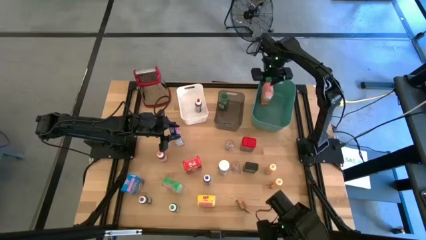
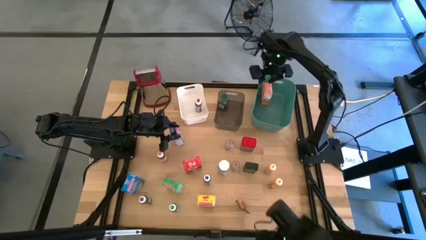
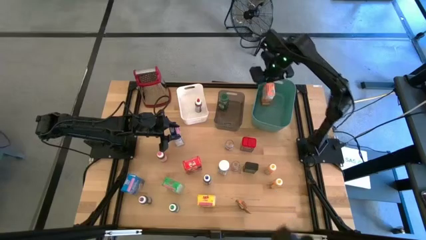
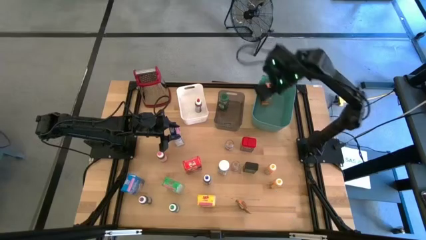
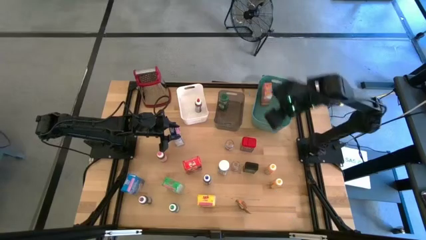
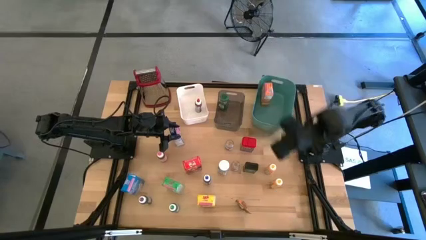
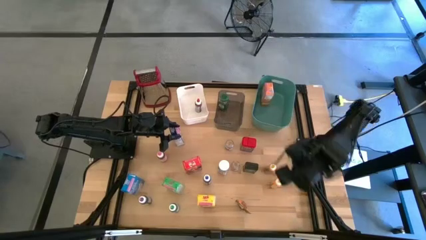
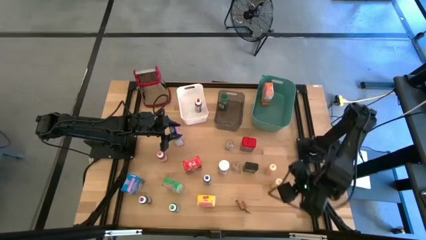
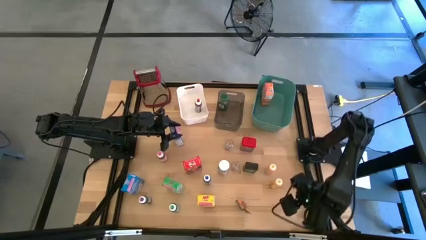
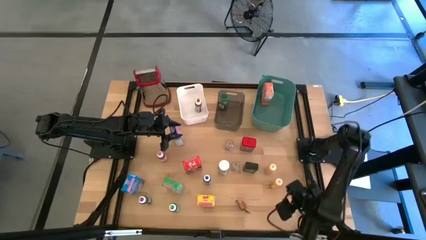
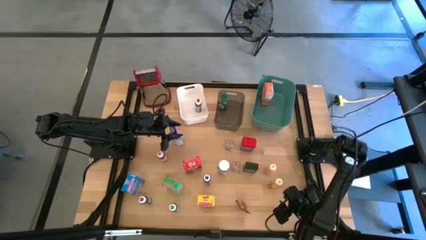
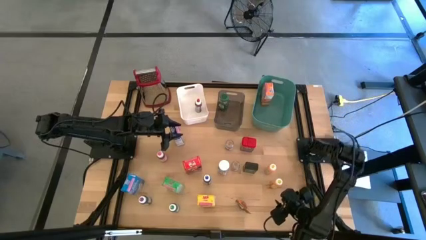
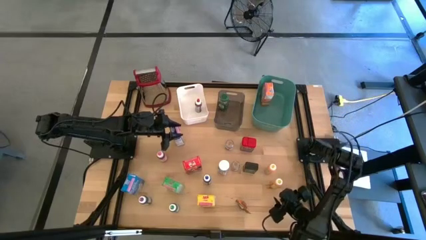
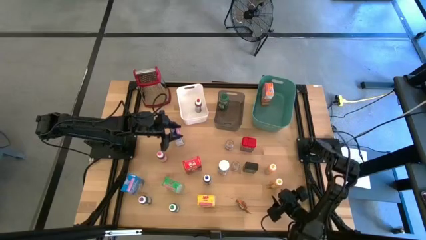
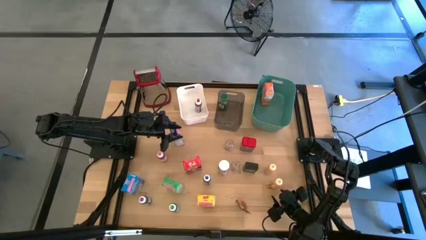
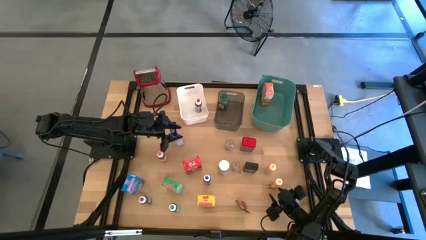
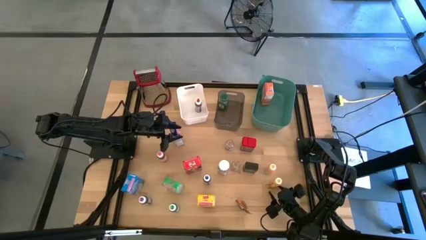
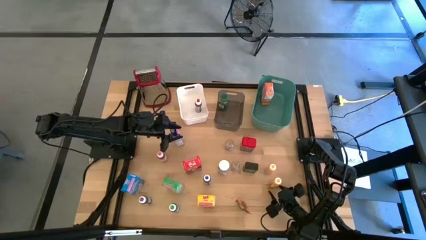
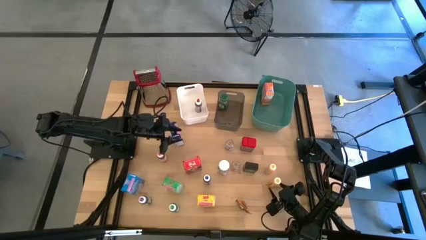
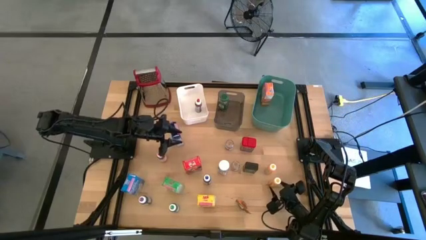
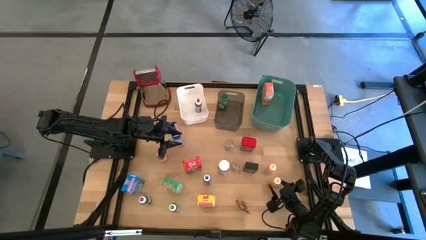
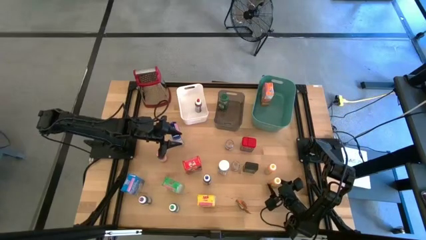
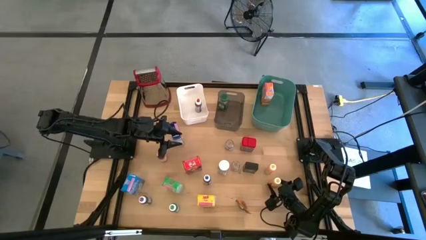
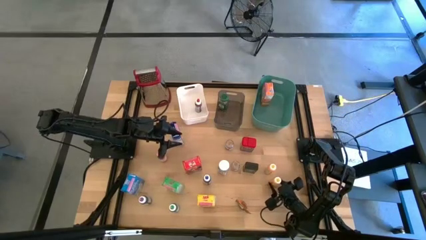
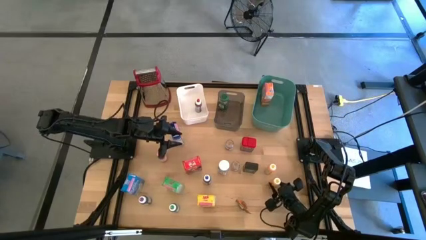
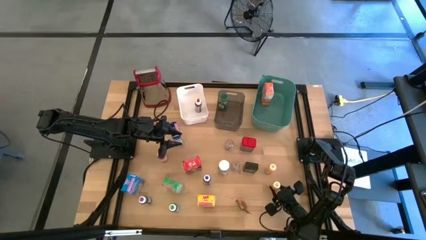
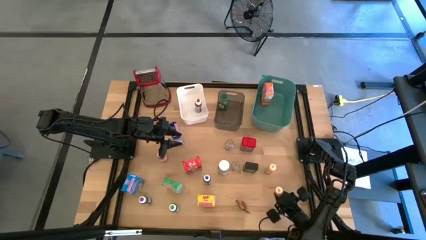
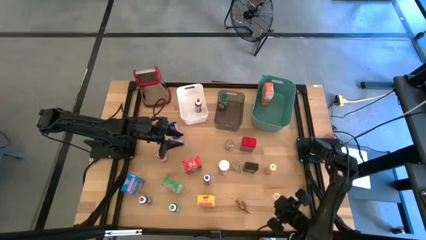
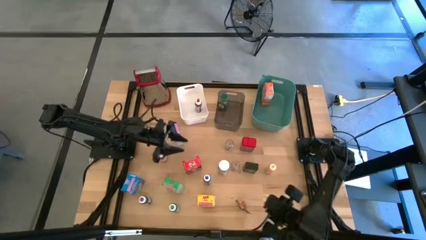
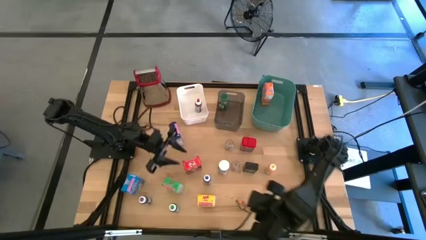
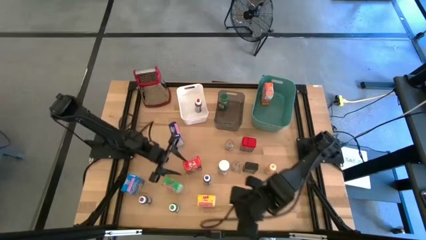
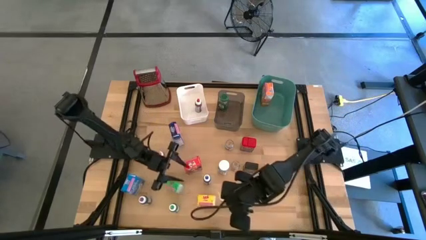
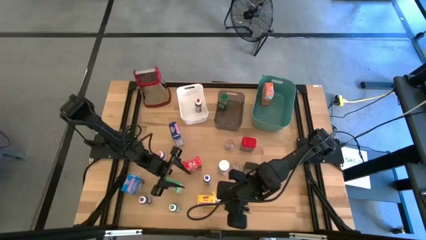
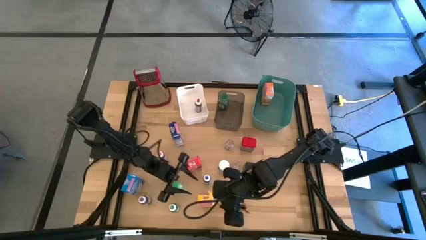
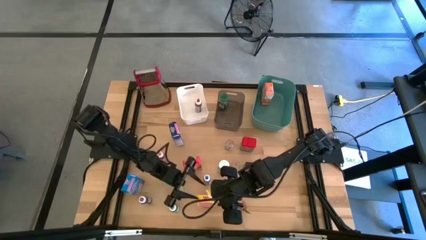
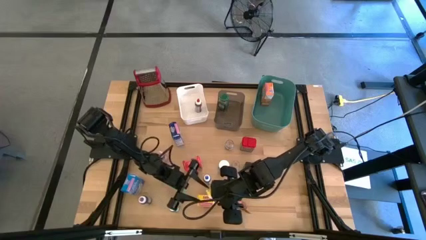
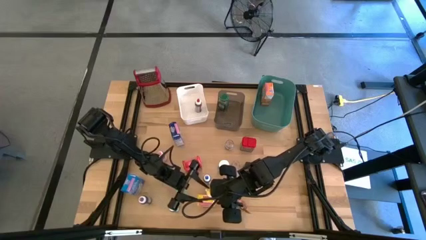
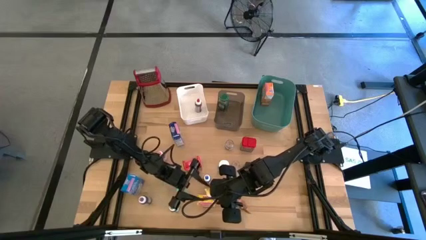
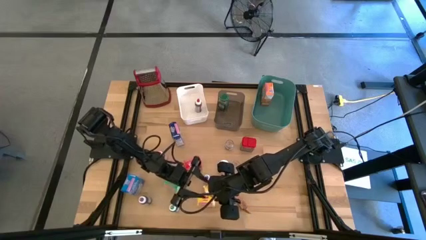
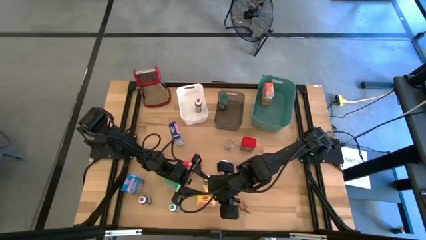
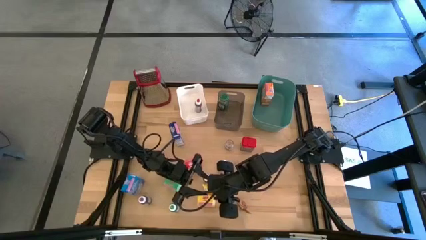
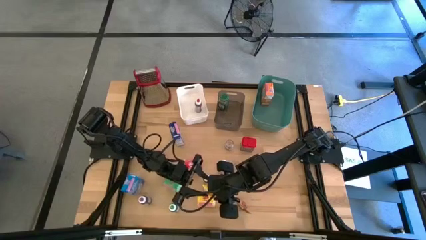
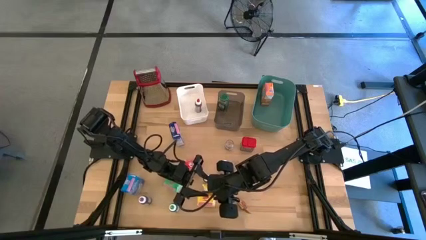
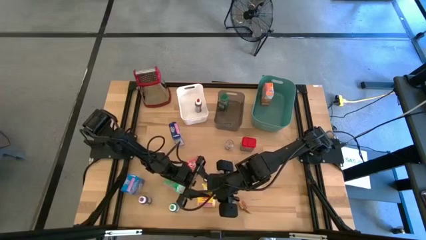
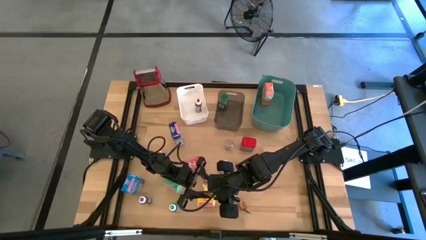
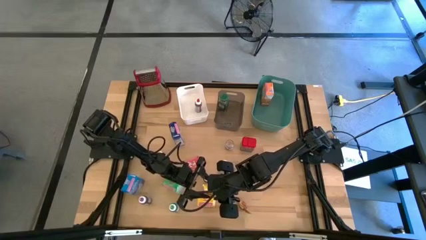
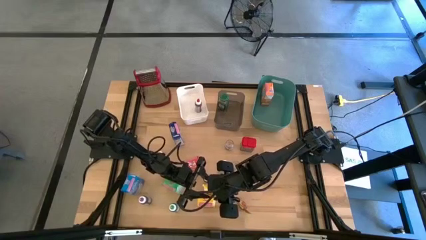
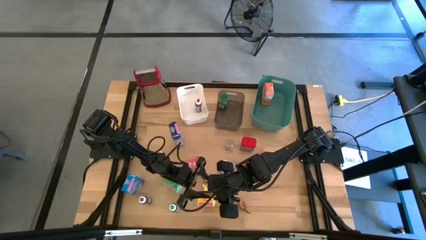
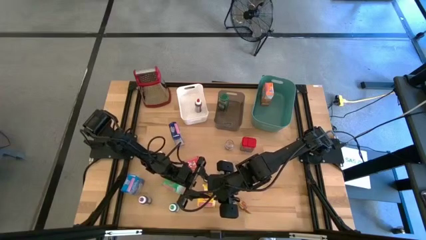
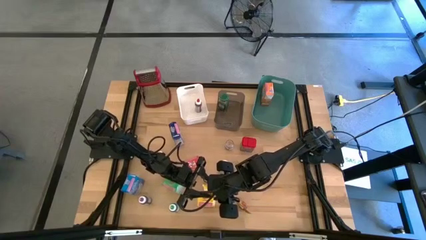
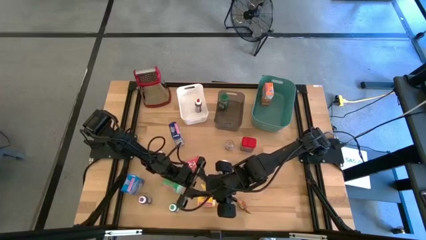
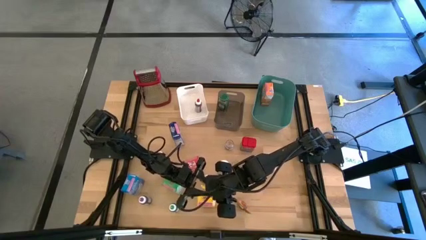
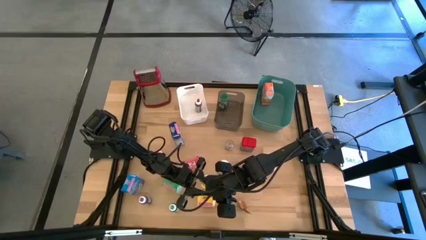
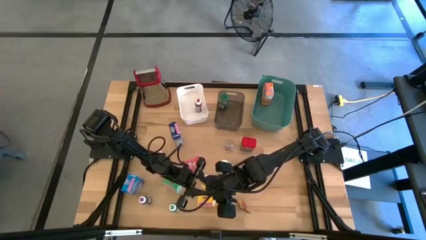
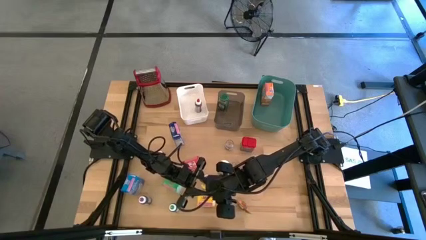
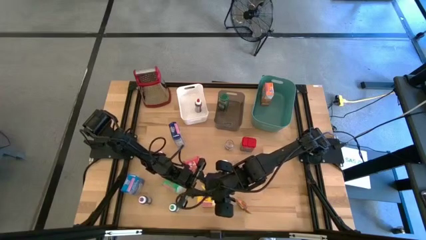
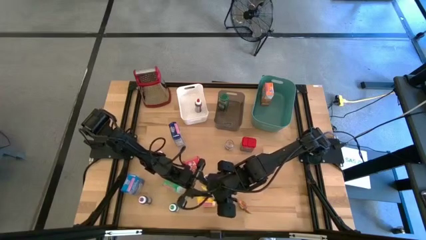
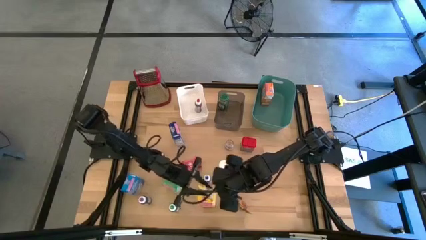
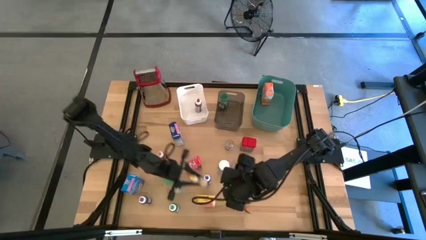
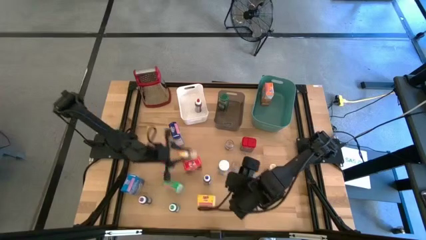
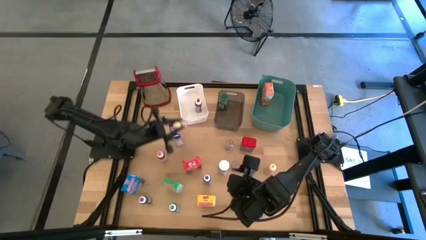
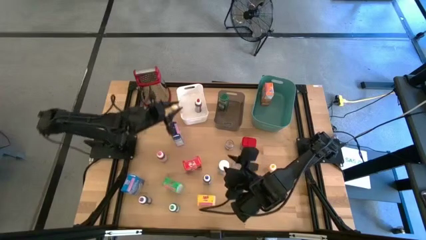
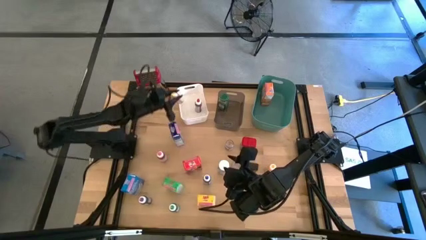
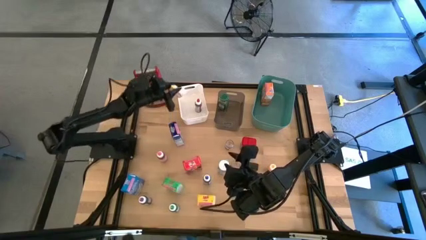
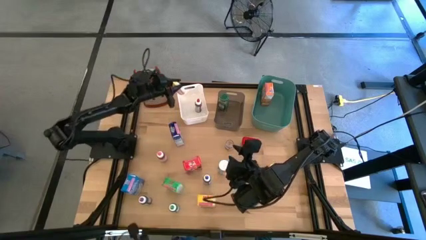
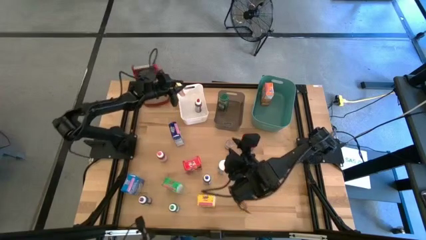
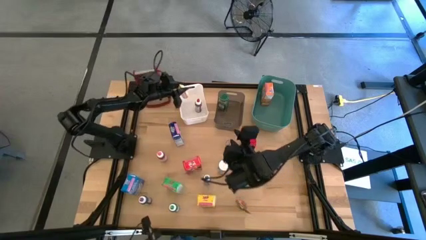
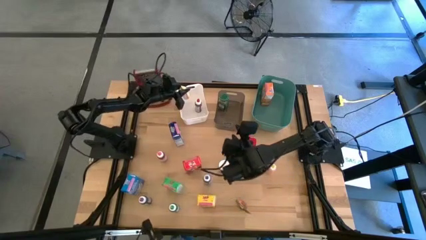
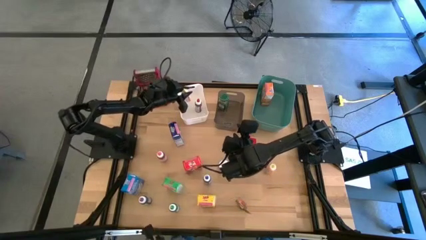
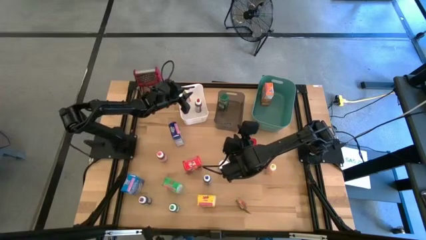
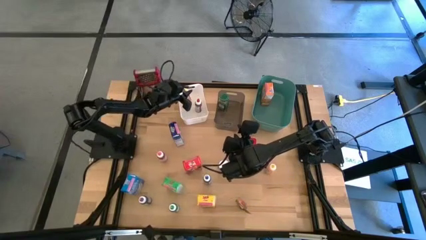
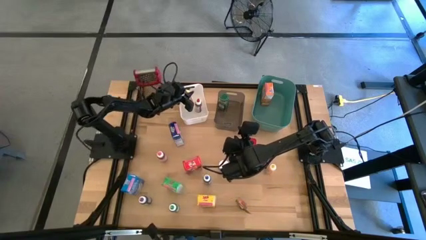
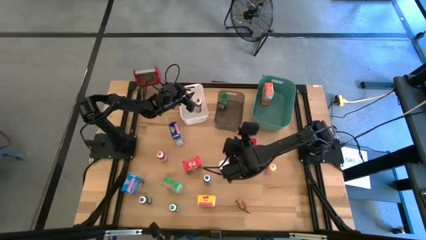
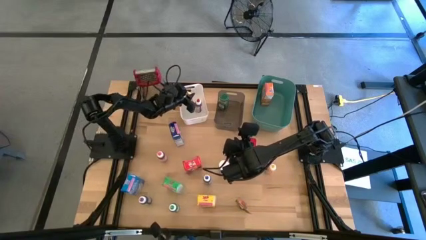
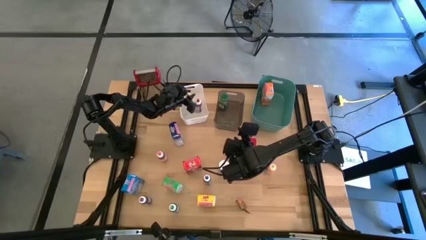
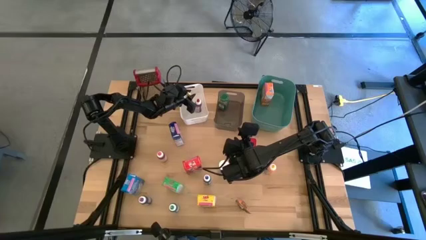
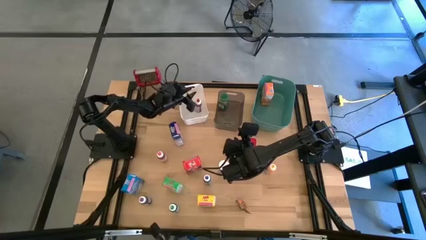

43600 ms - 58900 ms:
Task: Pick & Place Kitchen Items
Put the bottom yellow food coloring into the white bin
